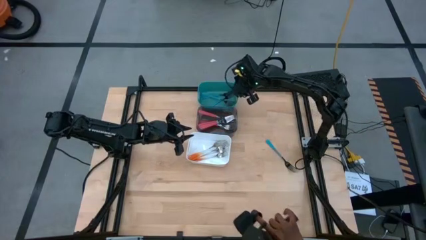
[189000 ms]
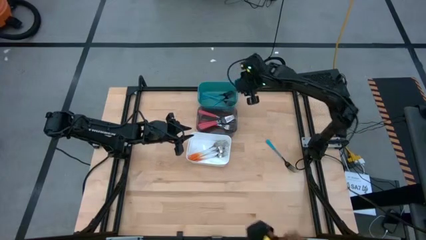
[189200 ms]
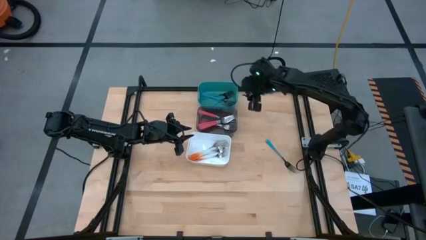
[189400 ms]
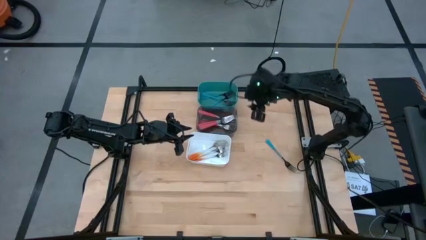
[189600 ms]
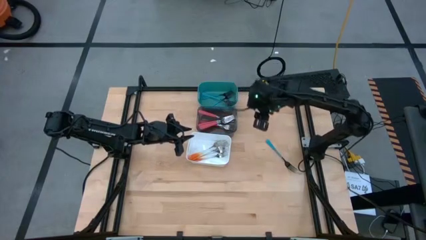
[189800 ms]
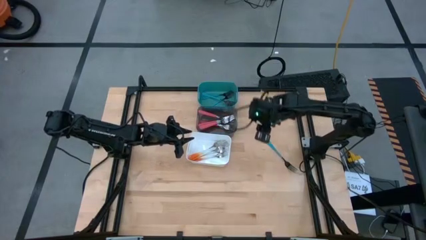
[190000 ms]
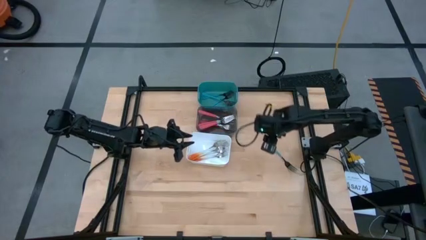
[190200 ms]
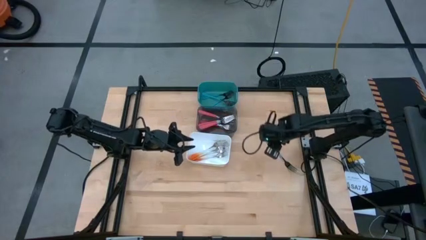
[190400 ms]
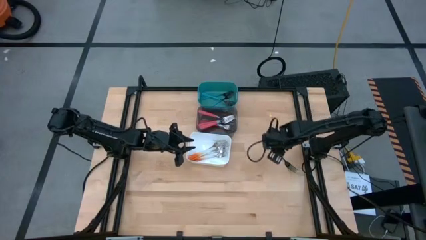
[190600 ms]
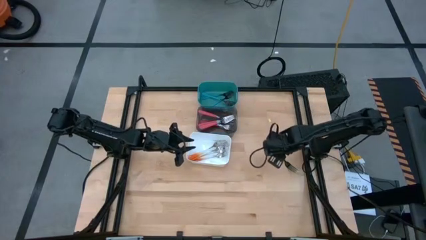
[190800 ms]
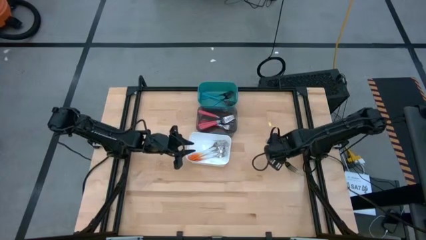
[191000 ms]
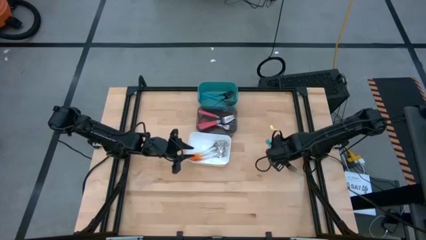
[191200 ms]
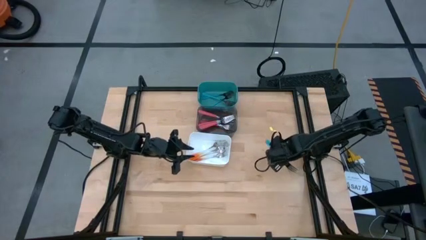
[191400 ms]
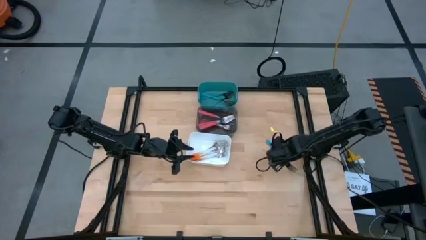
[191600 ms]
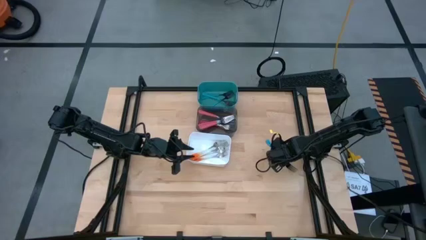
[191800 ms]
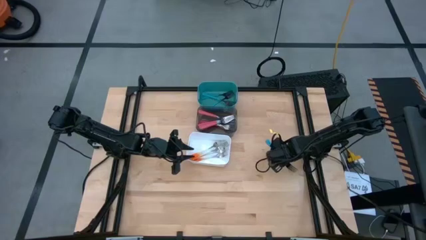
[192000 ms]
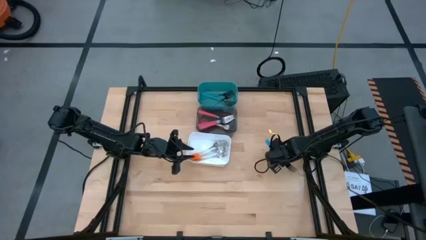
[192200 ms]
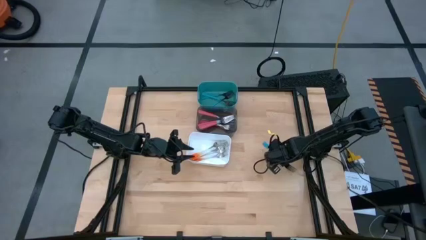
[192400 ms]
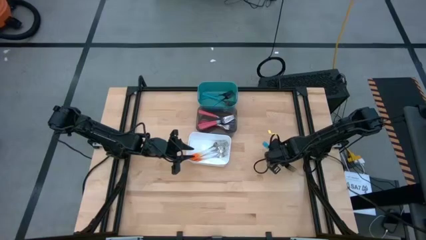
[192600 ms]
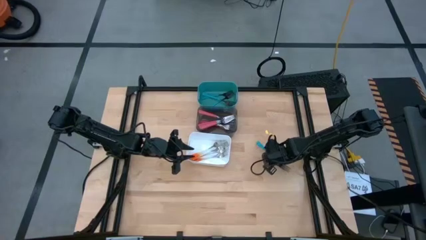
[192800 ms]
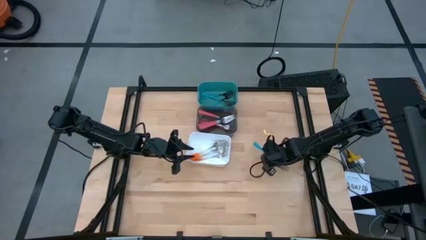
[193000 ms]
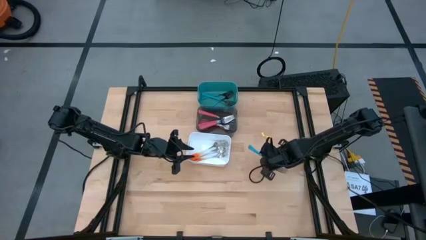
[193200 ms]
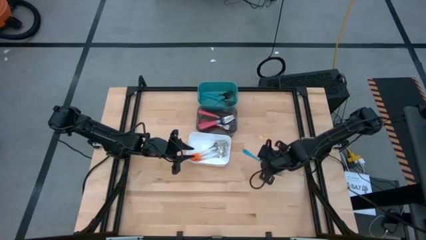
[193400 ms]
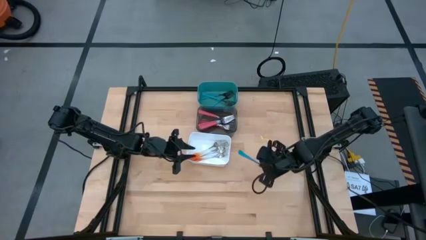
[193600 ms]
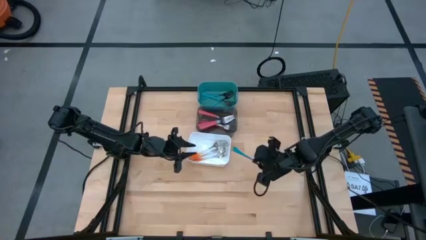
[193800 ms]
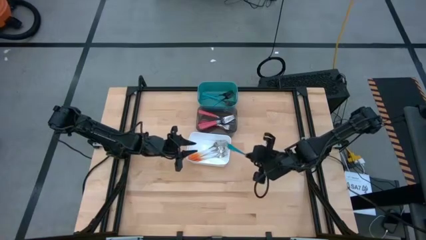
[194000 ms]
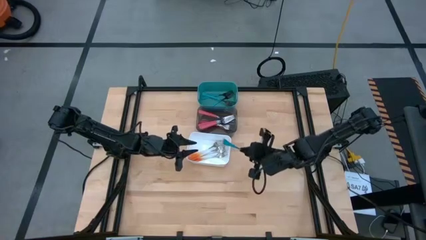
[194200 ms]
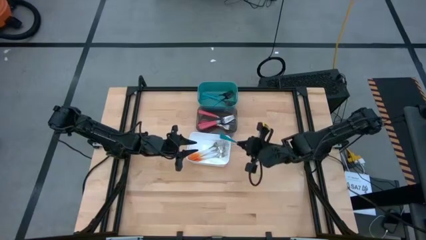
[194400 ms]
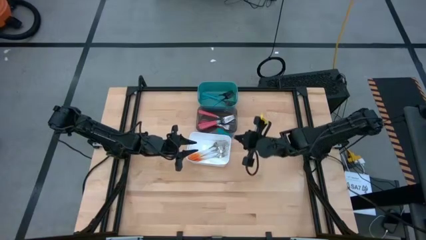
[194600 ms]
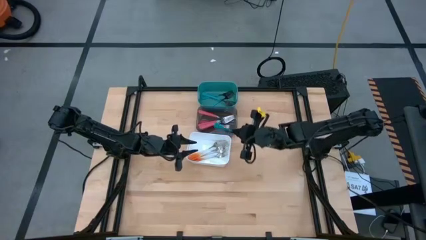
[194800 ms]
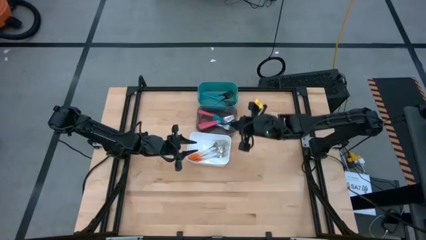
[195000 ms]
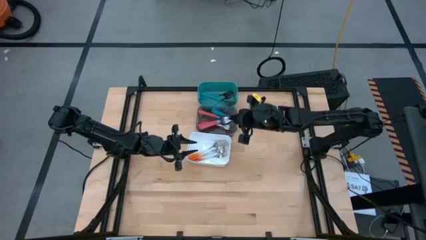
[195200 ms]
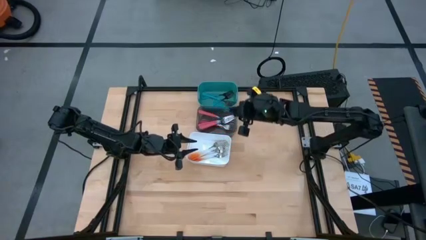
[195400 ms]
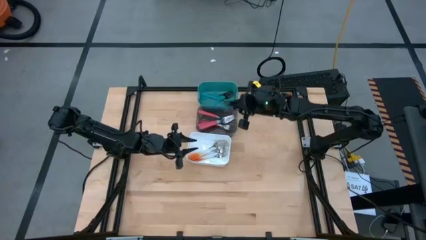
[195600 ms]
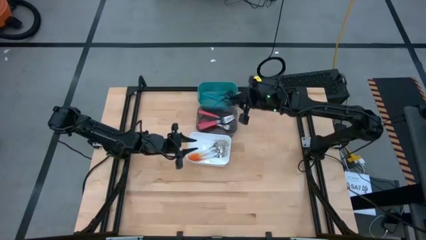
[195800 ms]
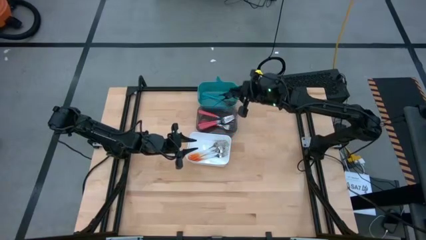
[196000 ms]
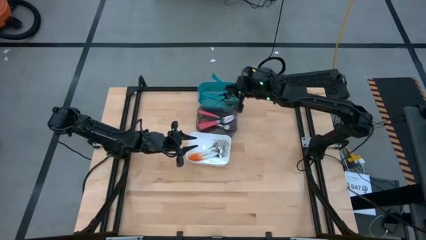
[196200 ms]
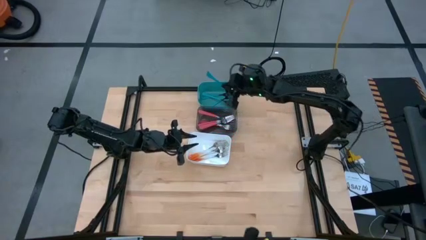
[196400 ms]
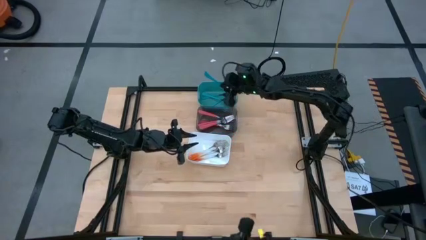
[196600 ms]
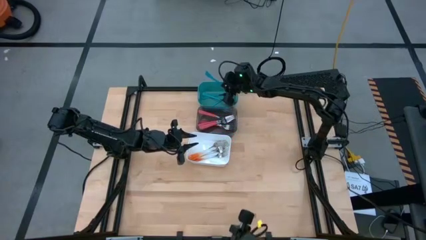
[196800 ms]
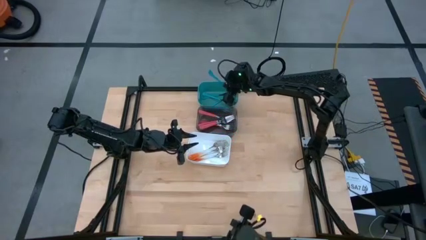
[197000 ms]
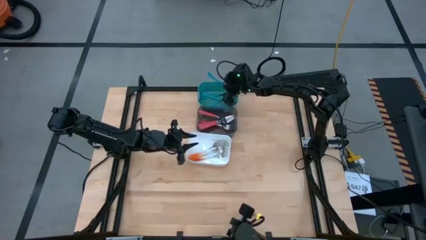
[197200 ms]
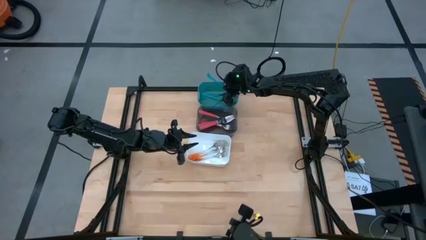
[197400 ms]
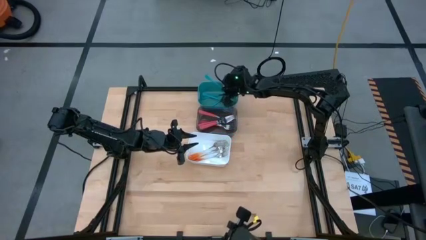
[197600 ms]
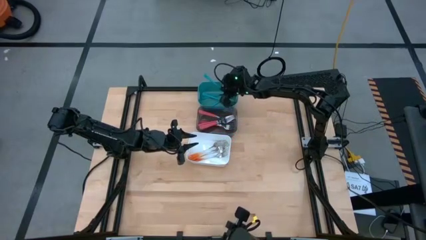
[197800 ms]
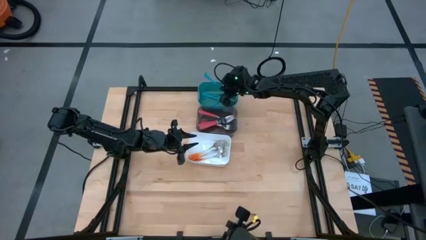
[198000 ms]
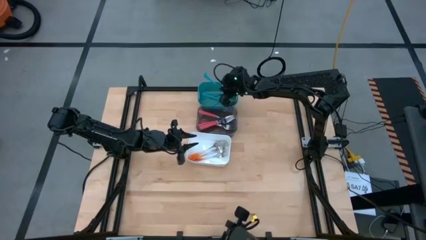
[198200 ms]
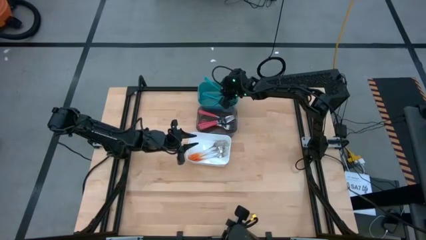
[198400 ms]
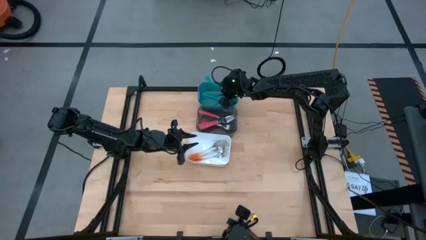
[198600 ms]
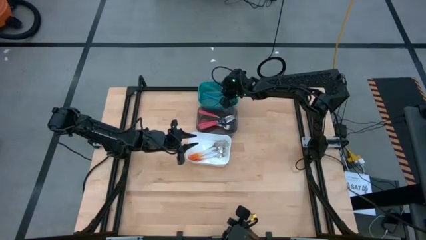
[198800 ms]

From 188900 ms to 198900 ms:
Task: Sort silverware by color (type)
Put the blue fork into the blue bin
